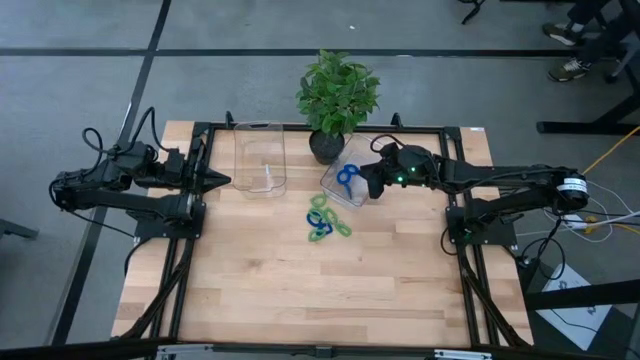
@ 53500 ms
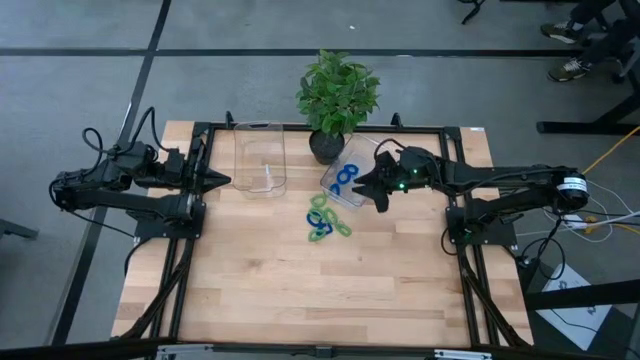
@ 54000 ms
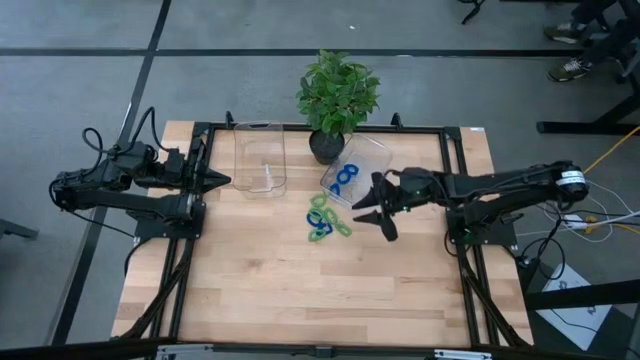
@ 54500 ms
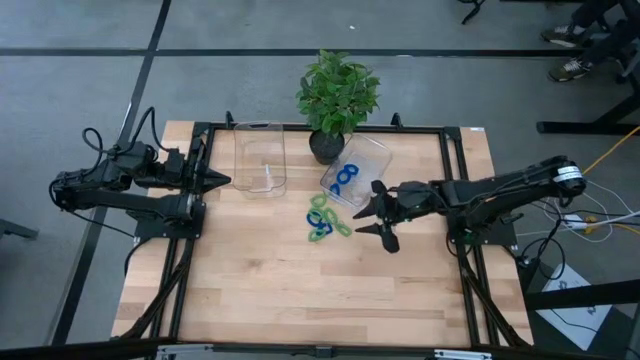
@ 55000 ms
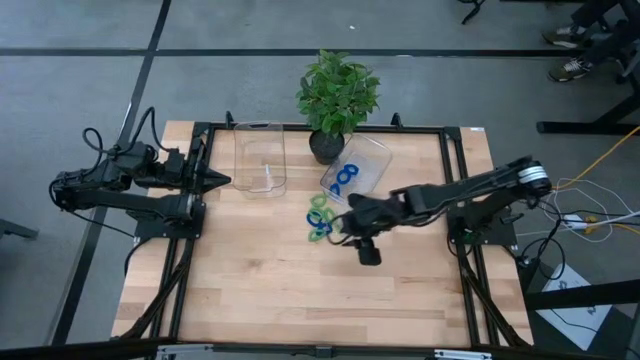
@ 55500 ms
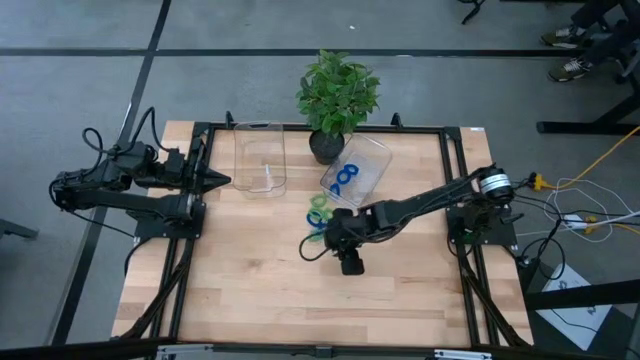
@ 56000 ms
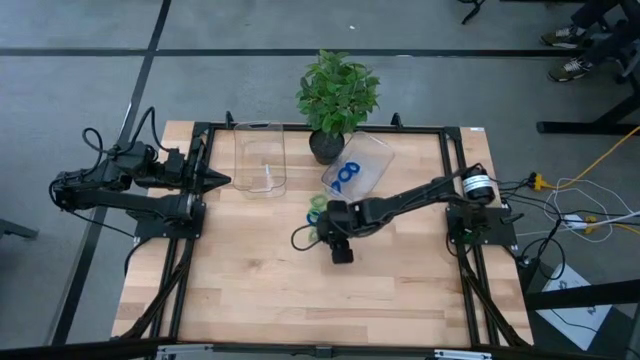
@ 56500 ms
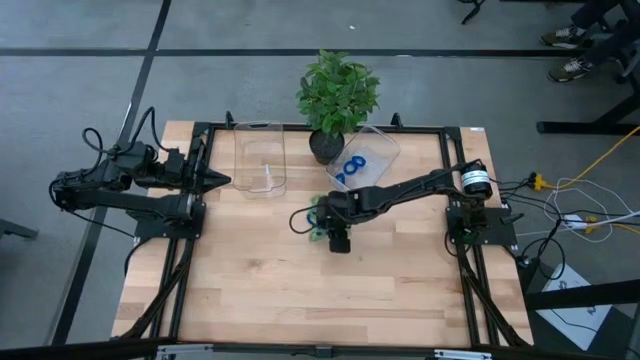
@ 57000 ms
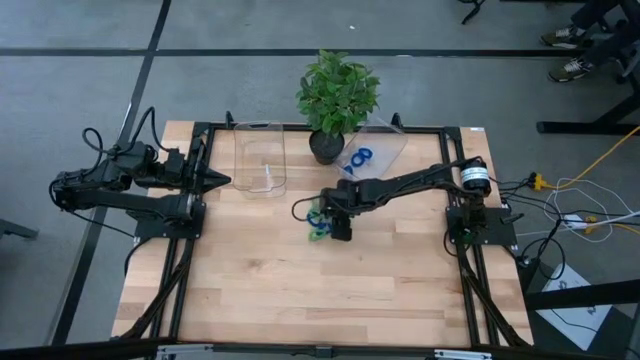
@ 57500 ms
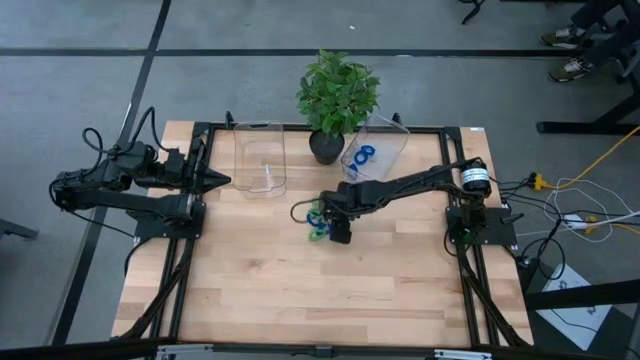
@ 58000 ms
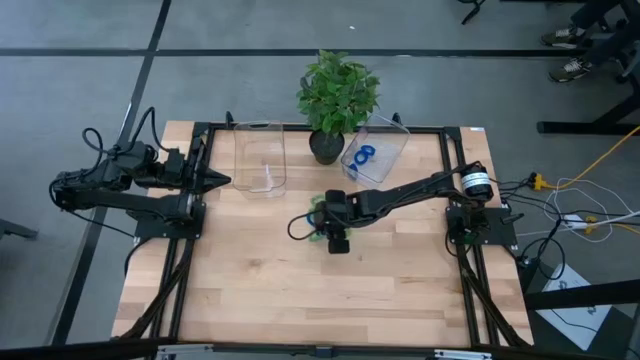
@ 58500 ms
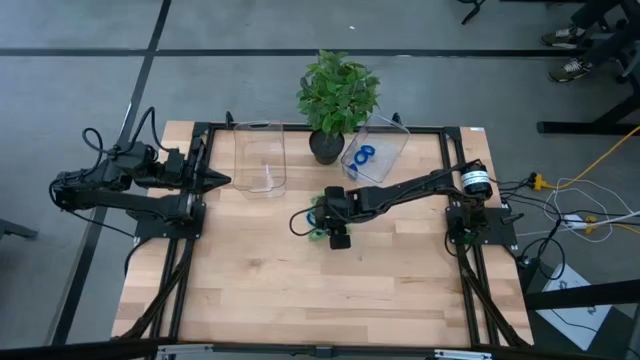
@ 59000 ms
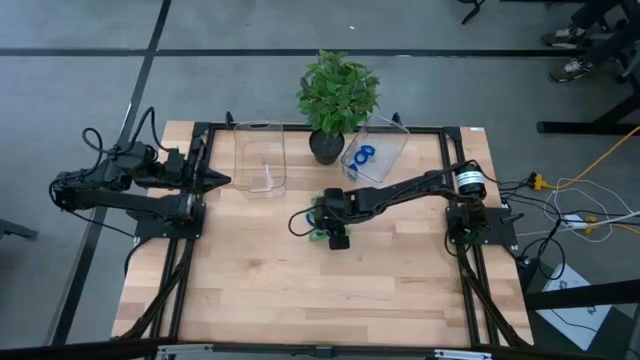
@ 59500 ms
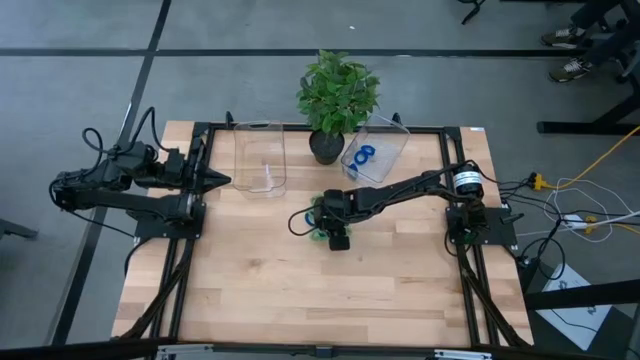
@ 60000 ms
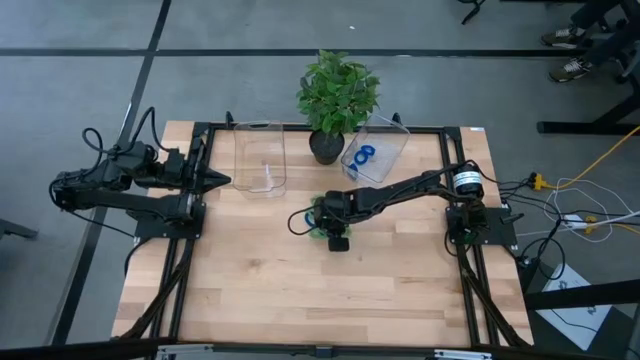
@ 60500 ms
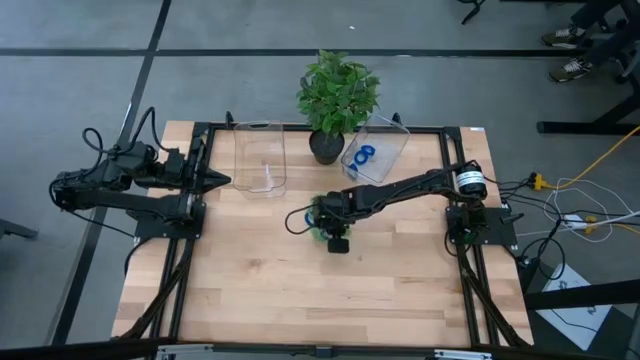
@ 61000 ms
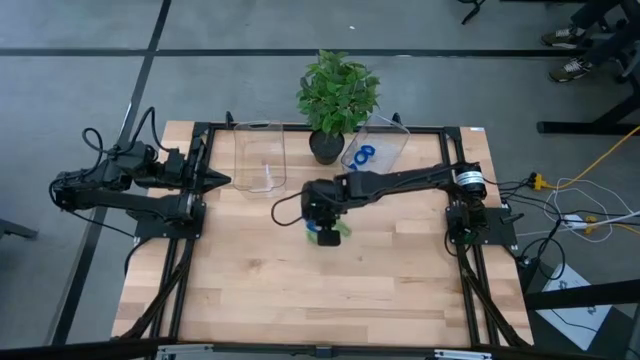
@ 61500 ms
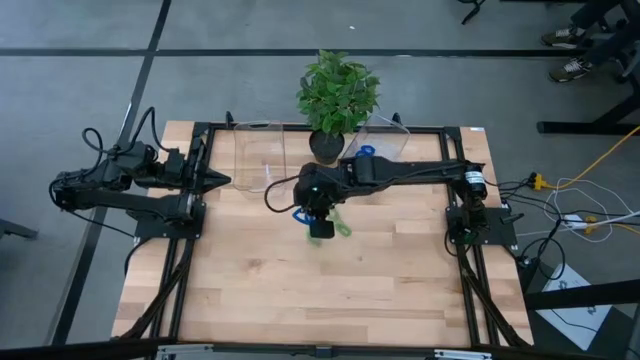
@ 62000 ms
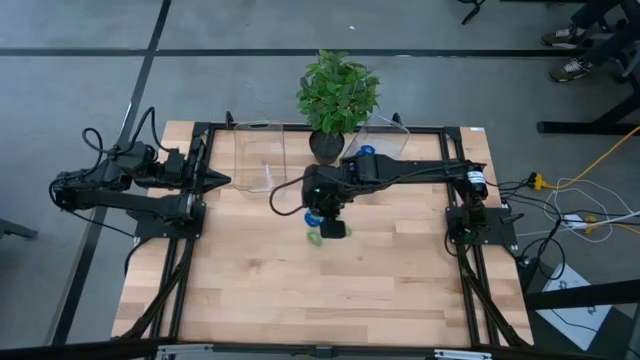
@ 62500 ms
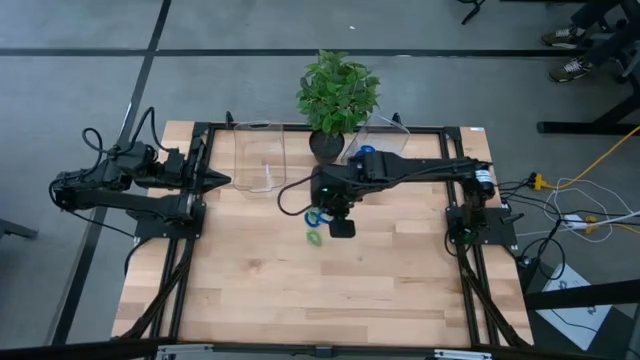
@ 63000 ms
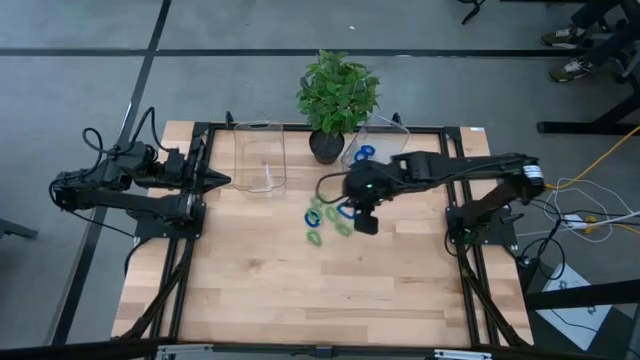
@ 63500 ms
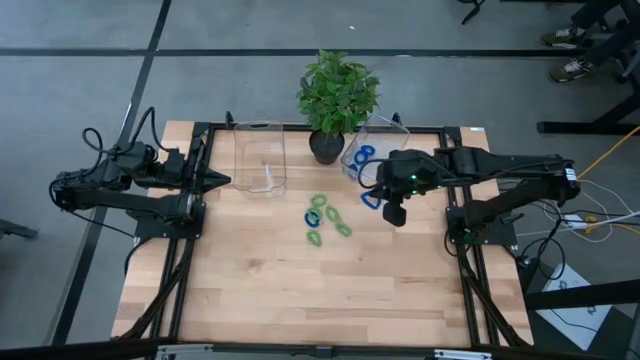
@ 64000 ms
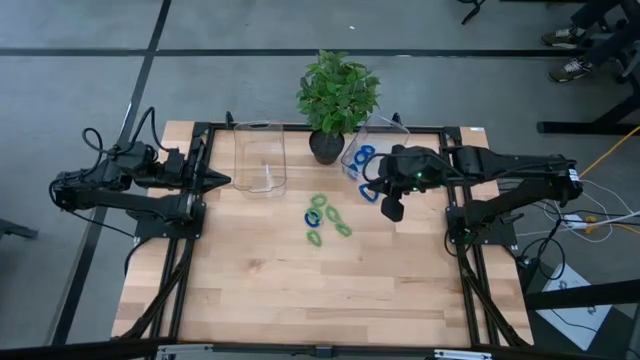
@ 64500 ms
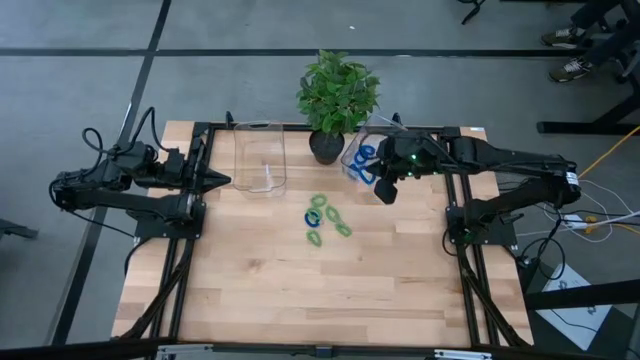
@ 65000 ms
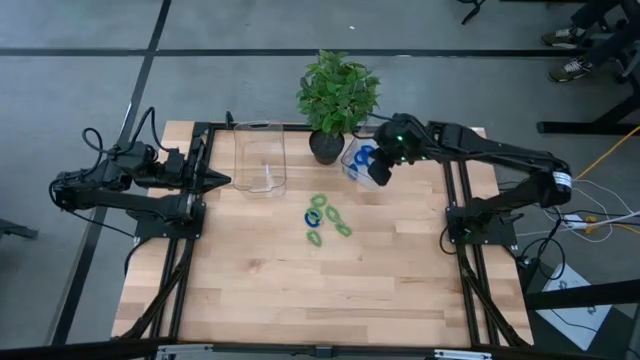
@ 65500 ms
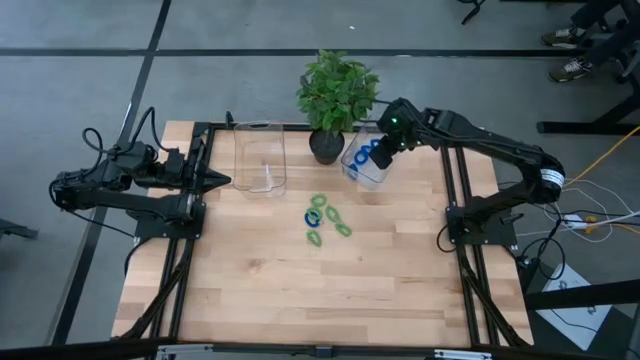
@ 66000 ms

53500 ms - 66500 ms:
Task: Sort spring keychains
Put the blue spring keychain into the right transparent bin

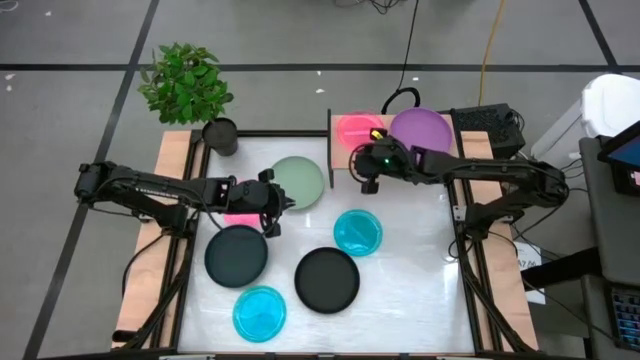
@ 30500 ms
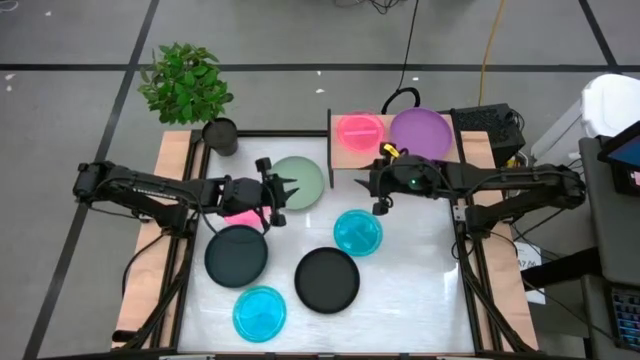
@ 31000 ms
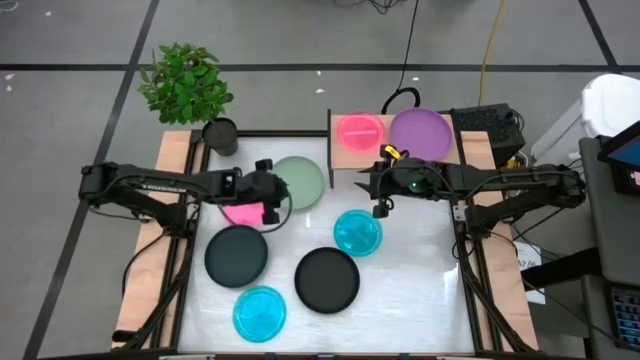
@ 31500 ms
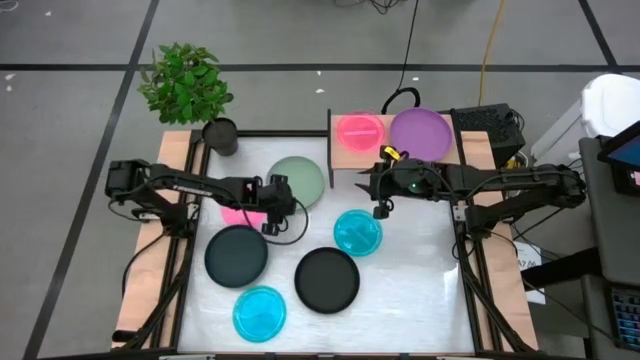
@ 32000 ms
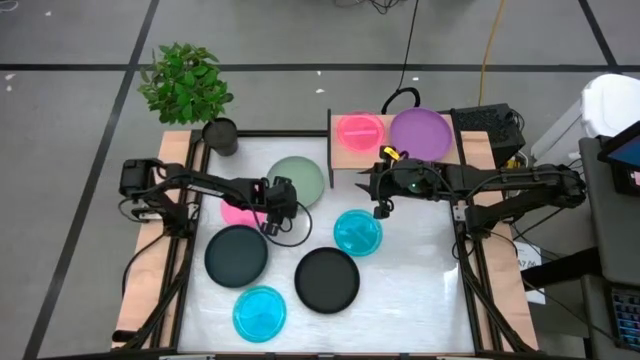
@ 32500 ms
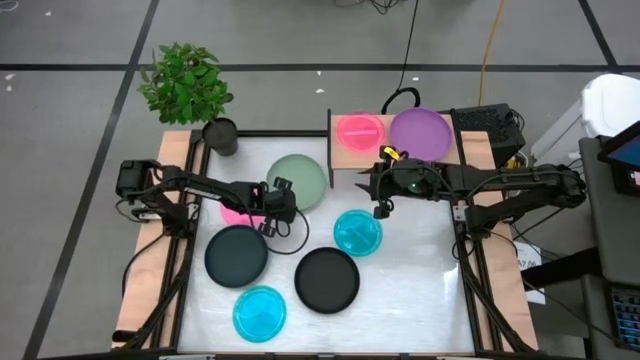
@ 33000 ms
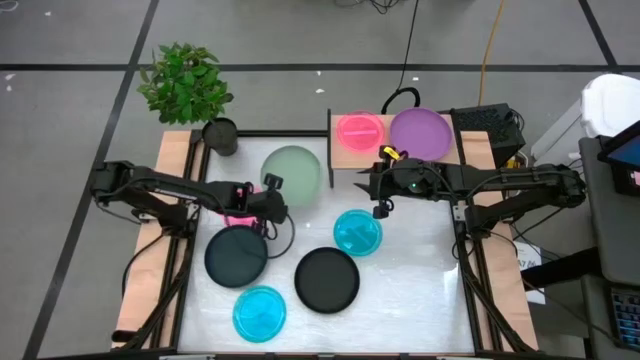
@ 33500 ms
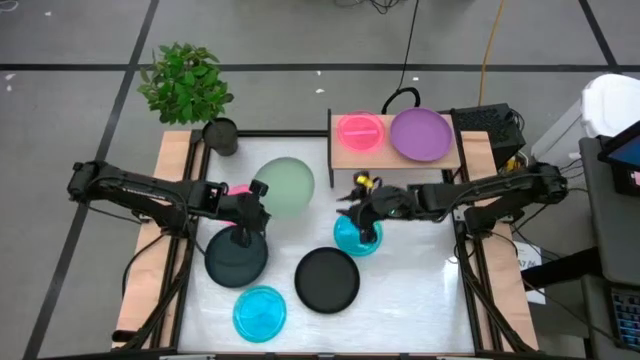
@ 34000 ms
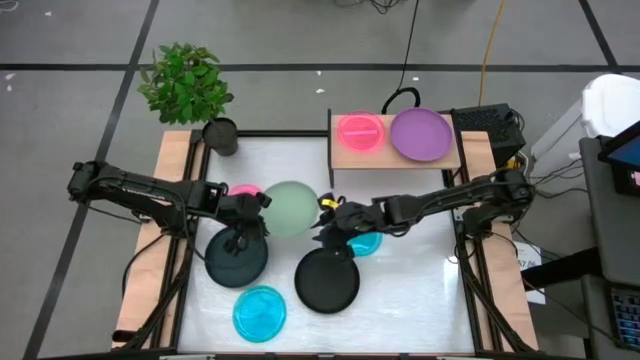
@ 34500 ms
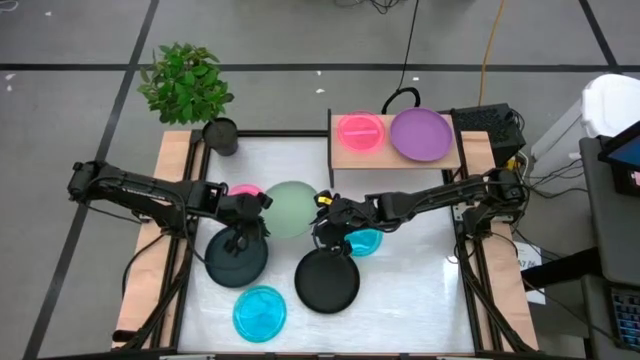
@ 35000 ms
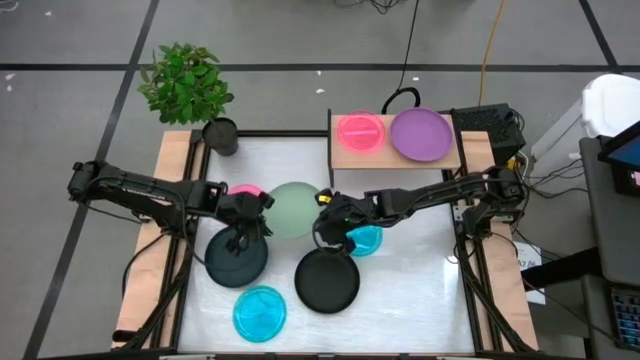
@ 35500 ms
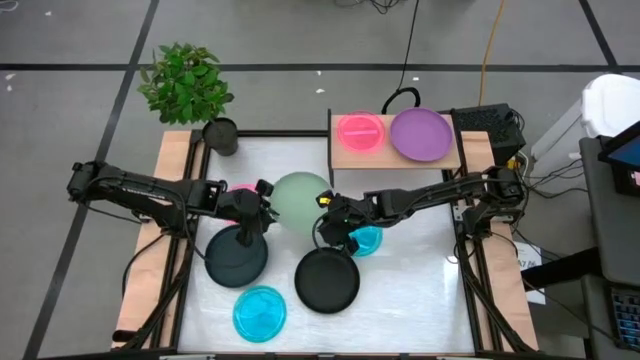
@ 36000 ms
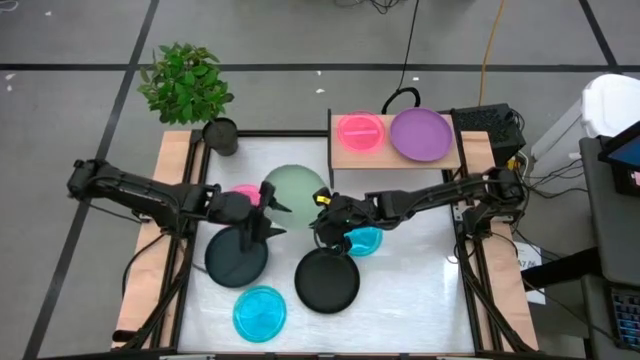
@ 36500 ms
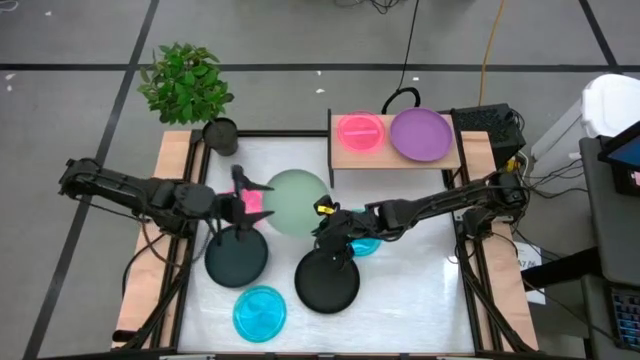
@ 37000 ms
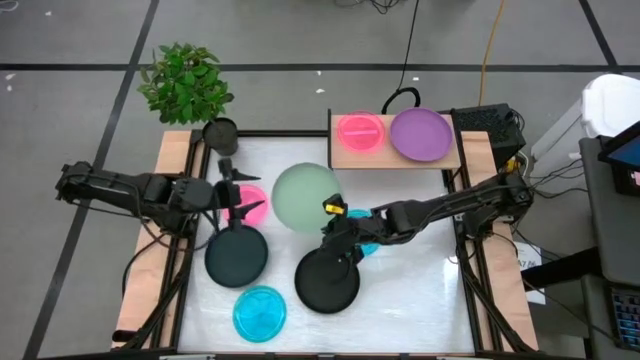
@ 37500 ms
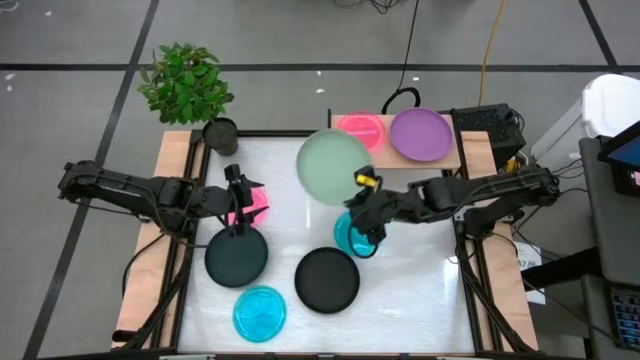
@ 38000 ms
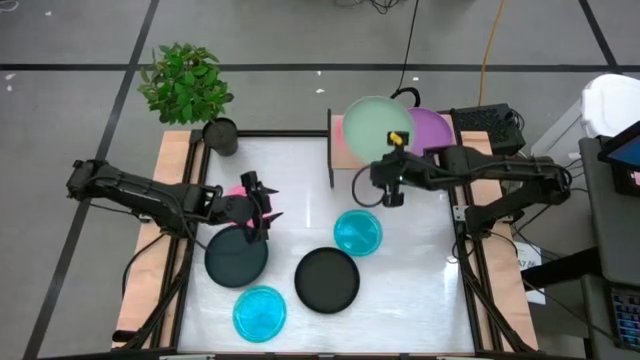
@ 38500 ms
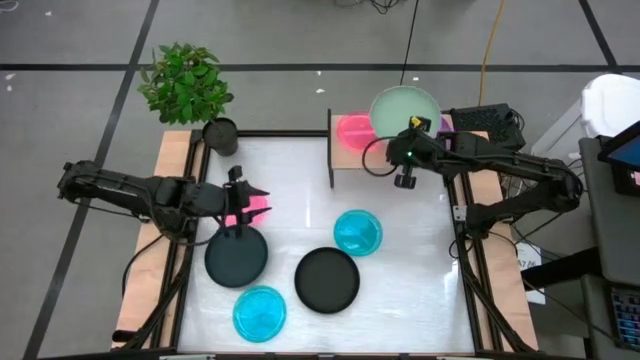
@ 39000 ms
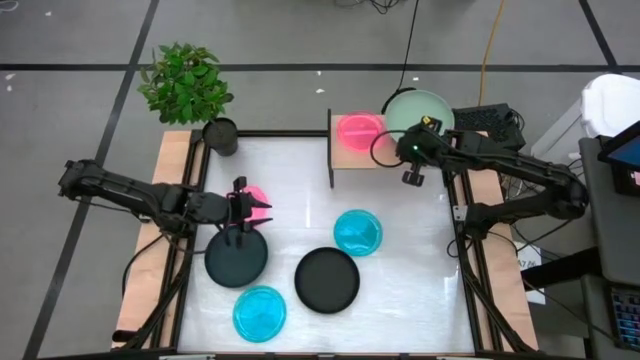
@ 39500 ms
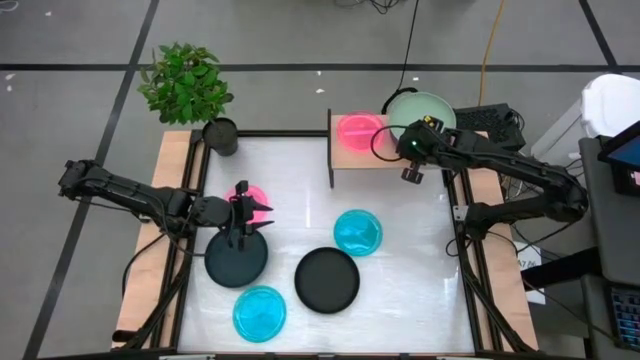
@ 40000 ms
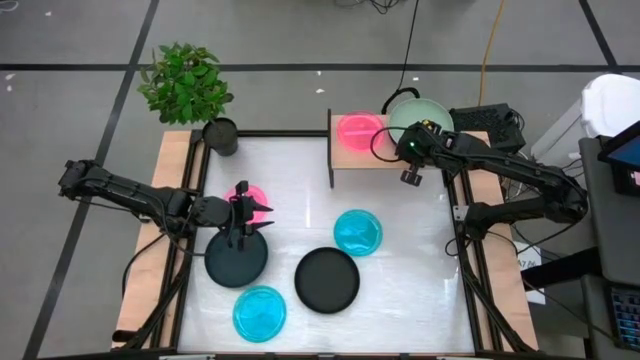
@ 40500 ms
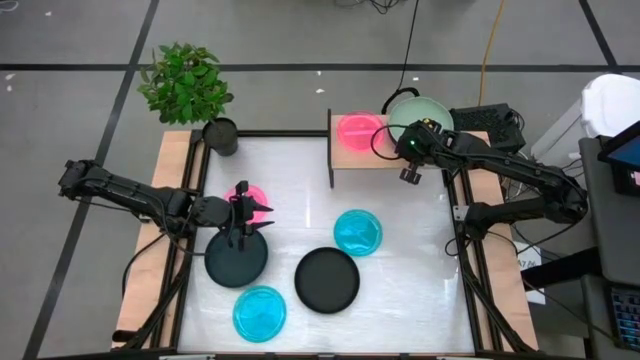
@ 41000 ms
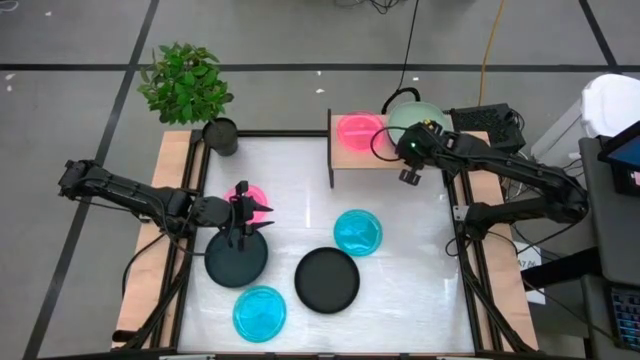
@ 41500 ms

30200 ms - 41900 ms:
Task: Place and stack plates onto a shelf
Stack the green plate on top of the violet plate on the shelf
